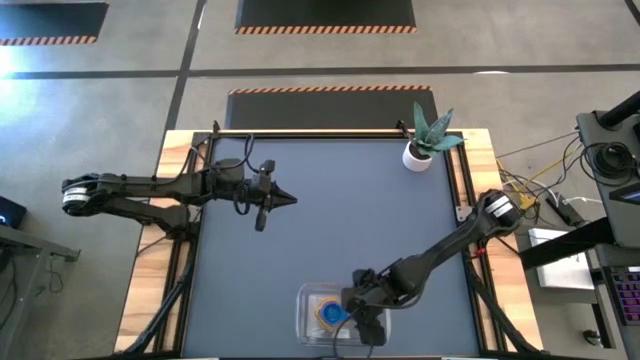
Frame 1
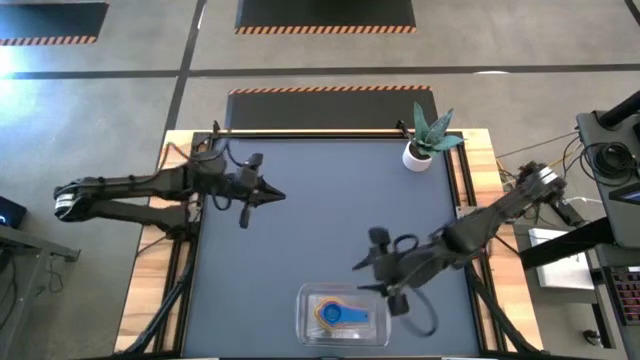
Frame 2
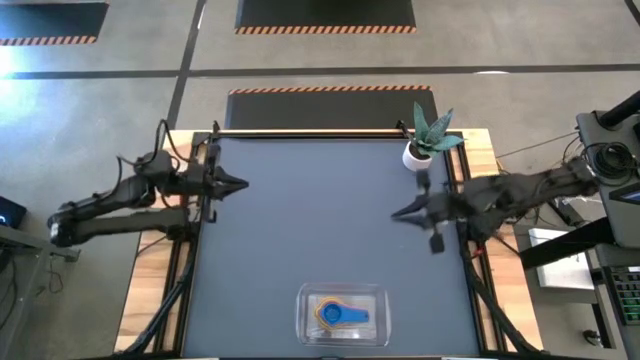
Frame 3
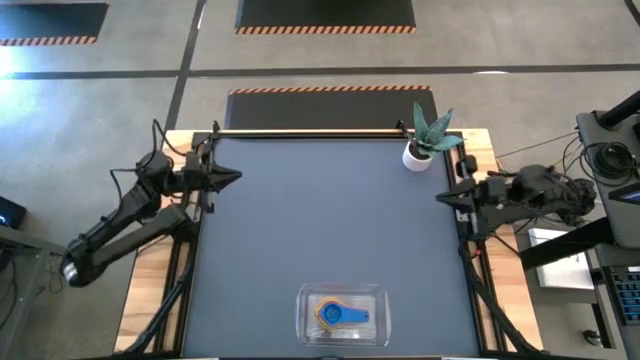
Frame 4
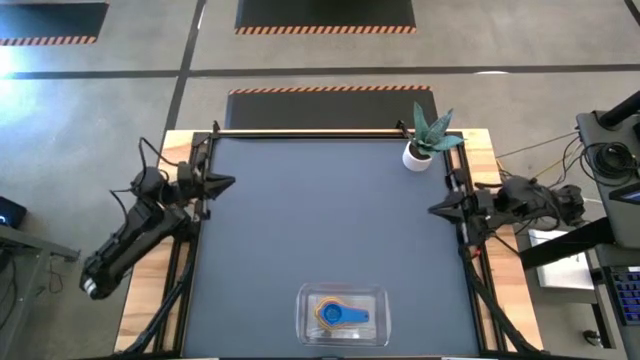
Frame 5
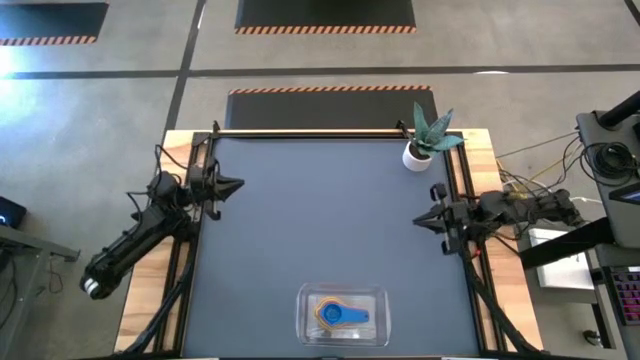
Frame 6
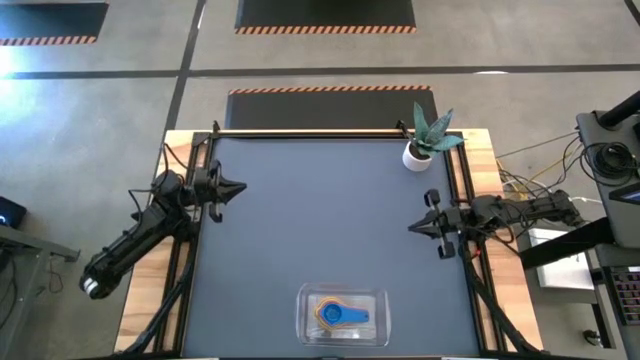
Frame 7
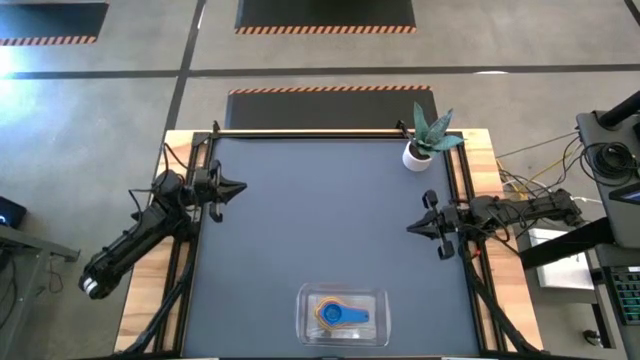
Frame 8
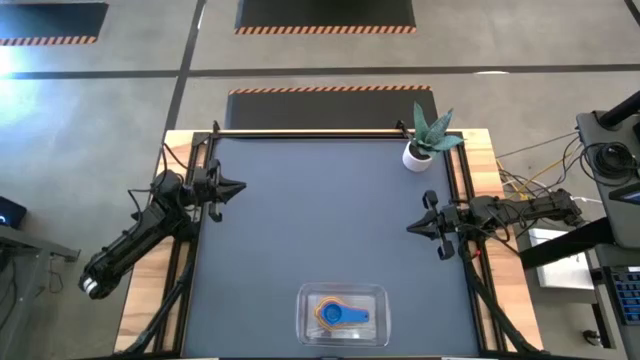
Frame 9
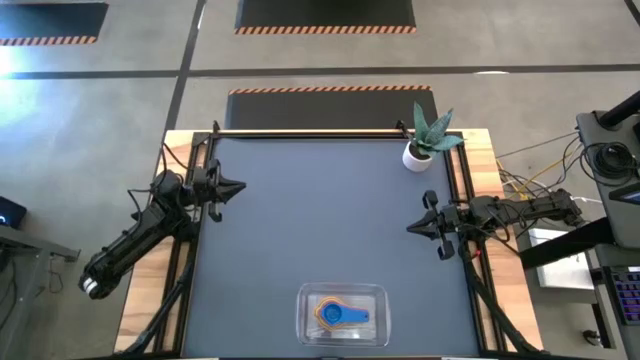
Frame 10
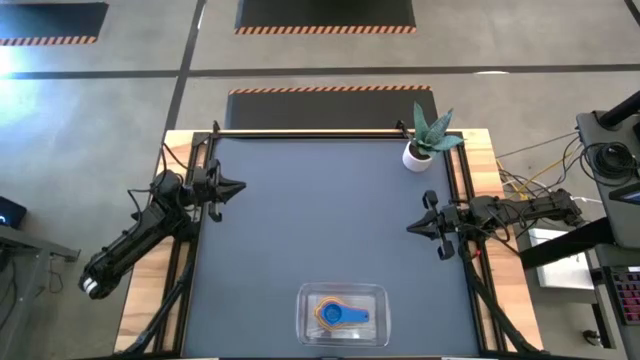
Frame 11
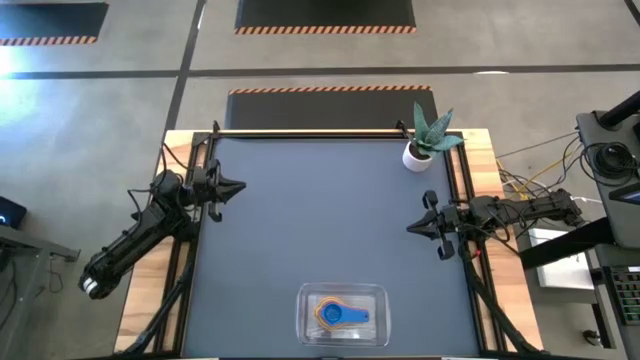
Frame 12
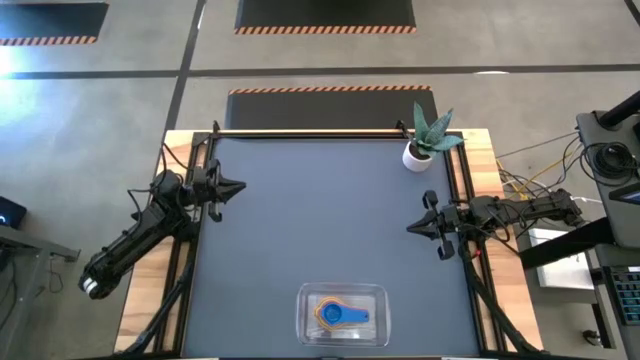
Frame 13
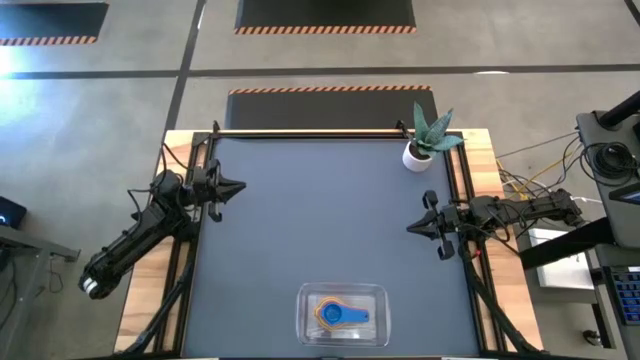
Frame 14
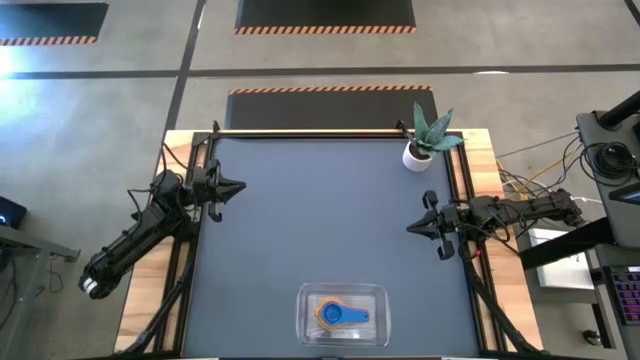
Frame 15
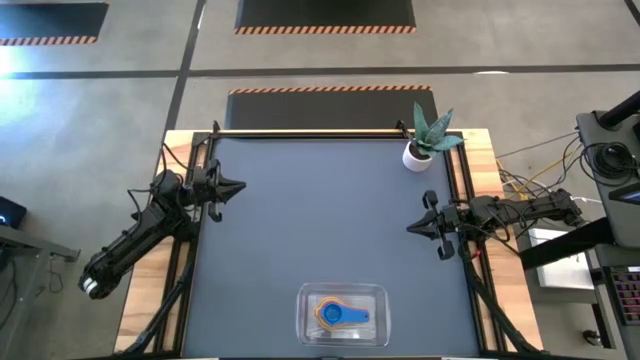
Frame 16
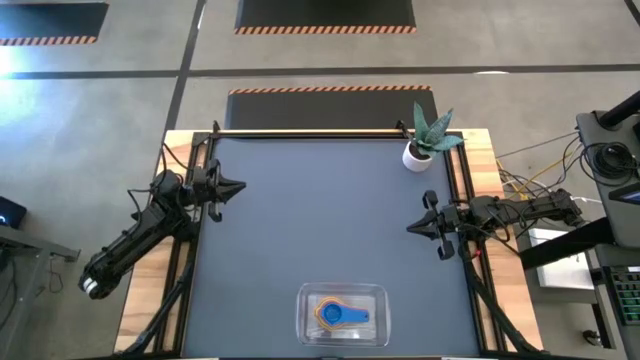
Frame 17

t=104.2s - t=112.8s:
Task: Nest measuring cups in basket
Return to Home Position

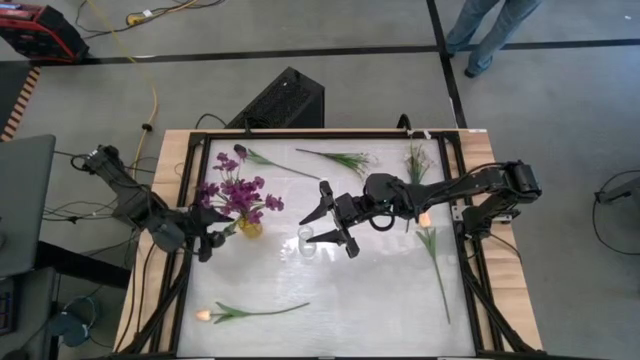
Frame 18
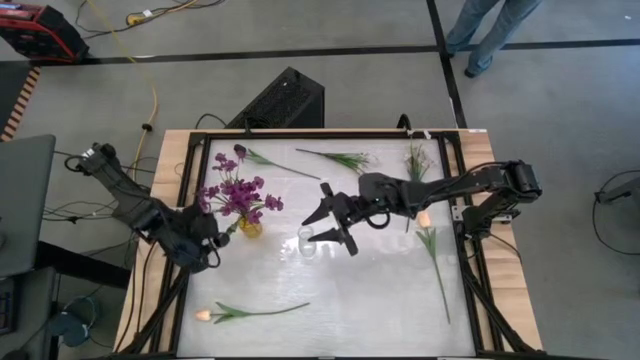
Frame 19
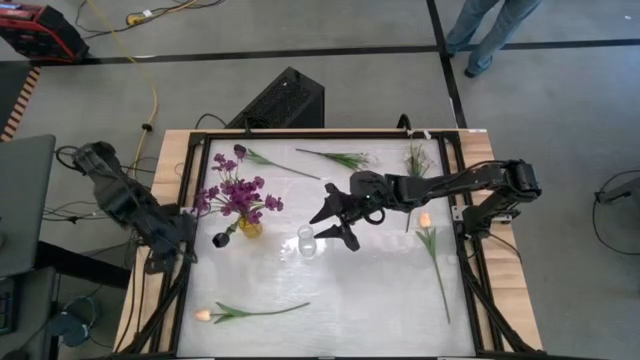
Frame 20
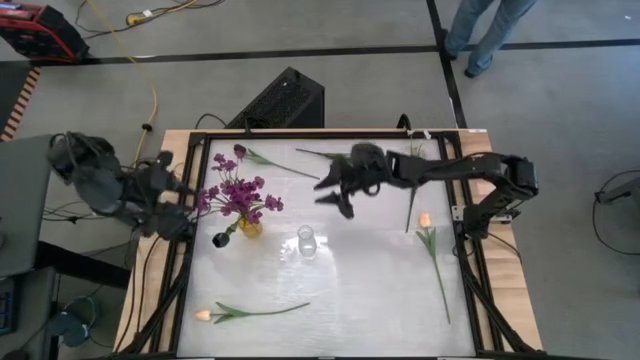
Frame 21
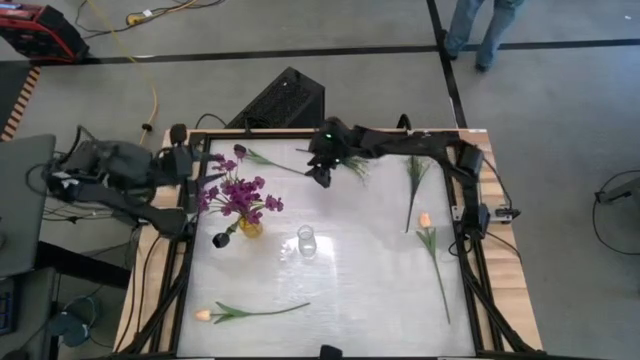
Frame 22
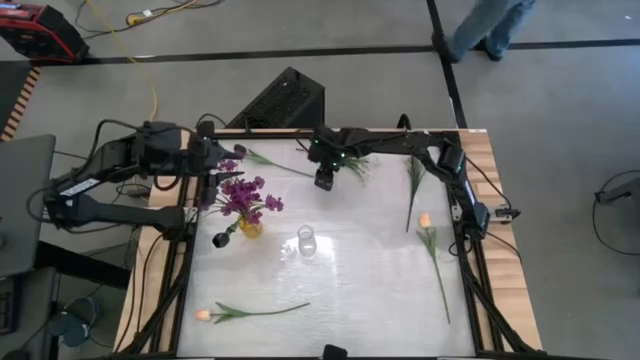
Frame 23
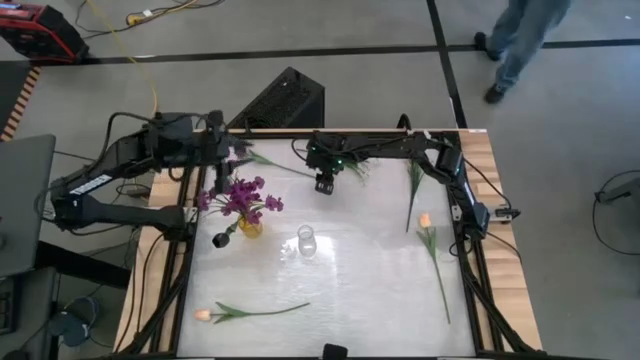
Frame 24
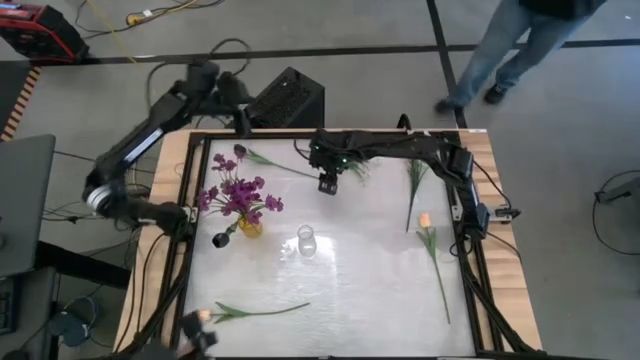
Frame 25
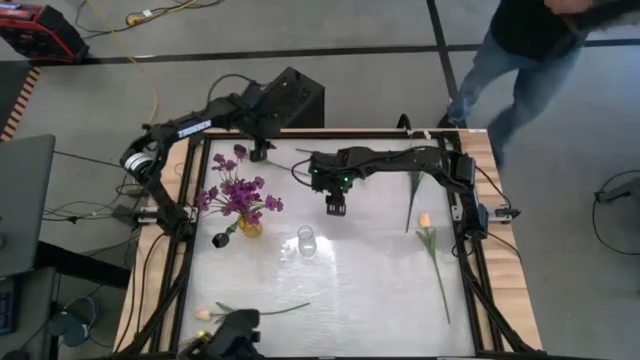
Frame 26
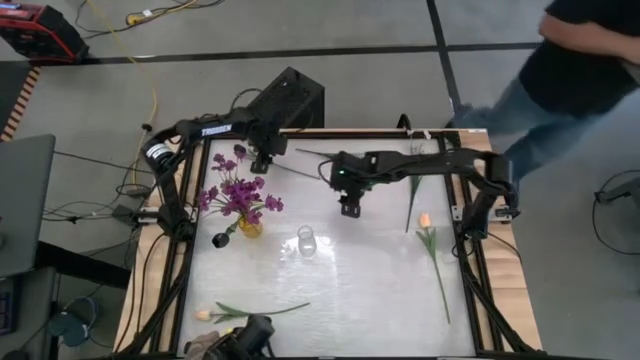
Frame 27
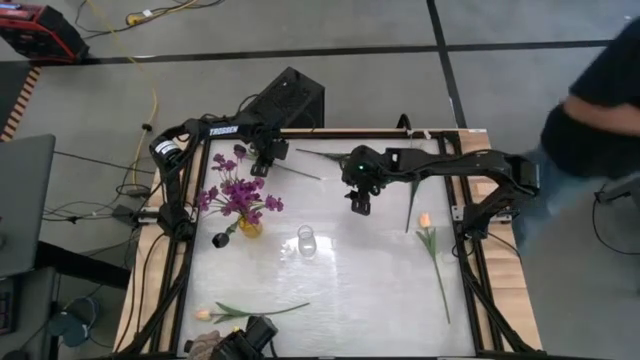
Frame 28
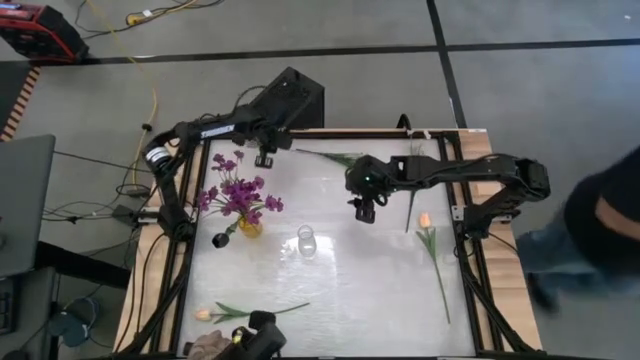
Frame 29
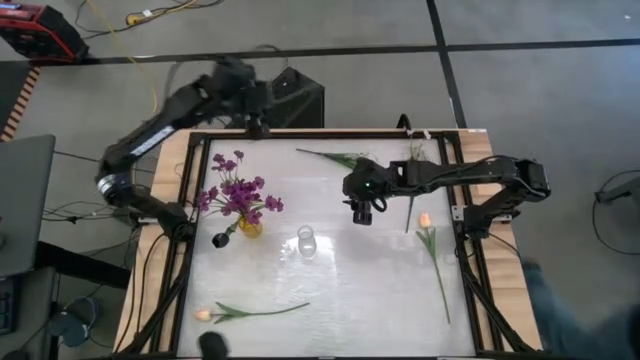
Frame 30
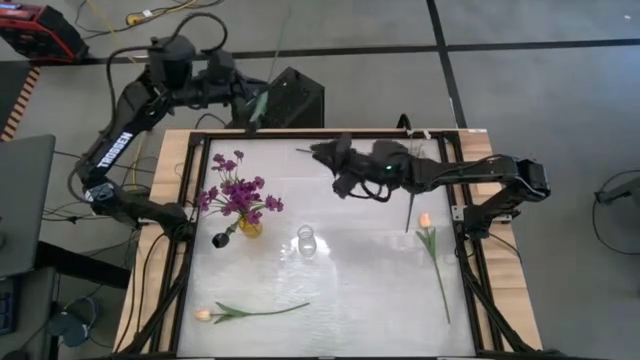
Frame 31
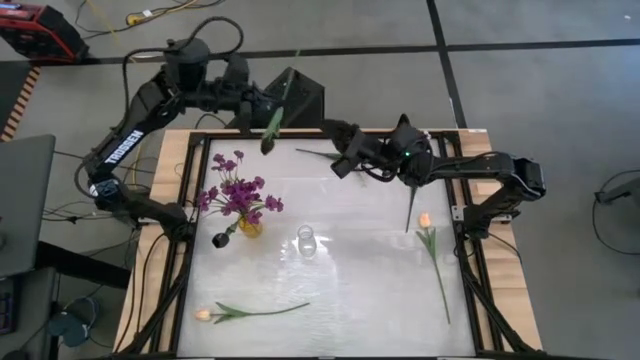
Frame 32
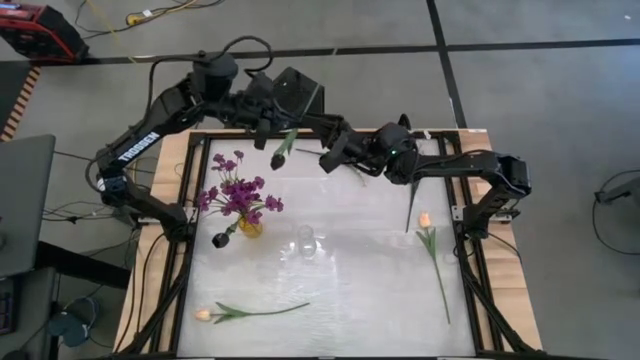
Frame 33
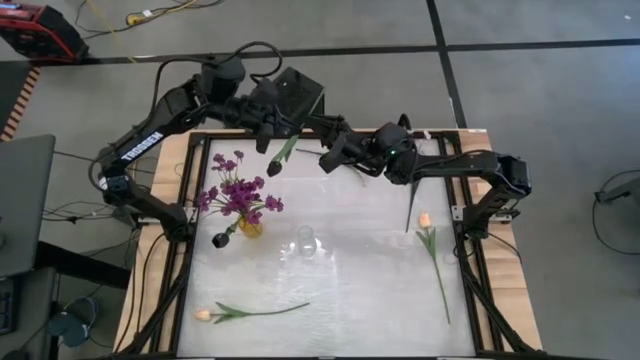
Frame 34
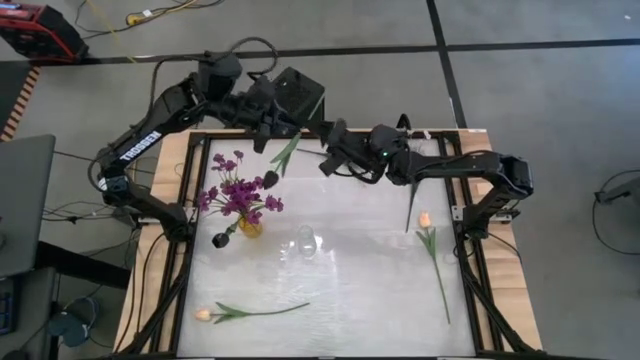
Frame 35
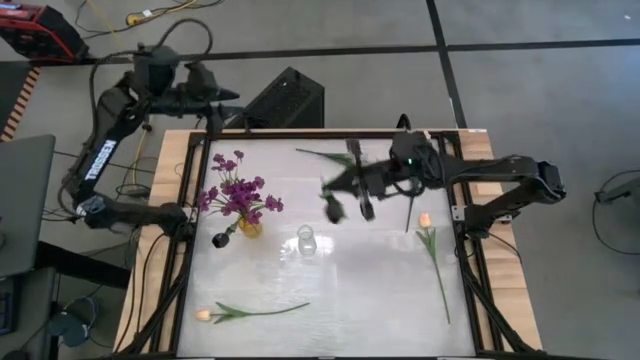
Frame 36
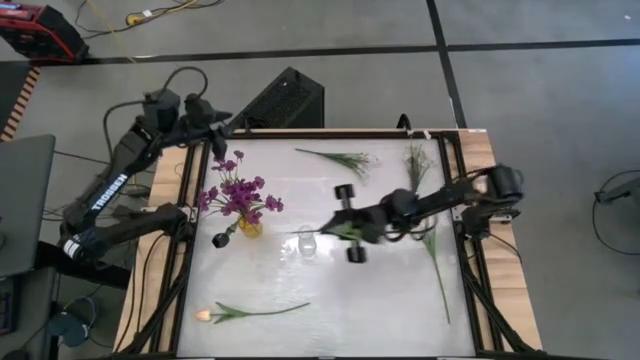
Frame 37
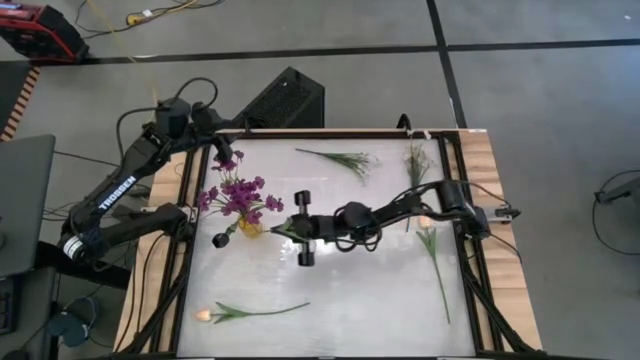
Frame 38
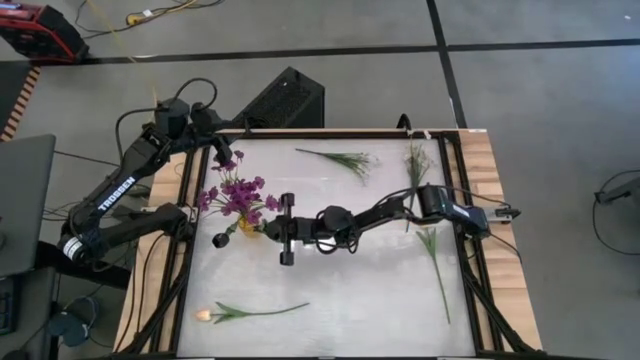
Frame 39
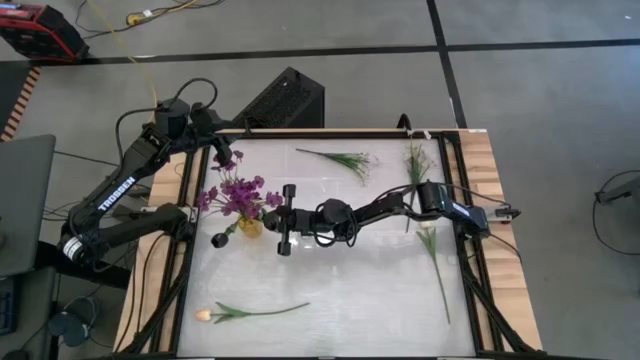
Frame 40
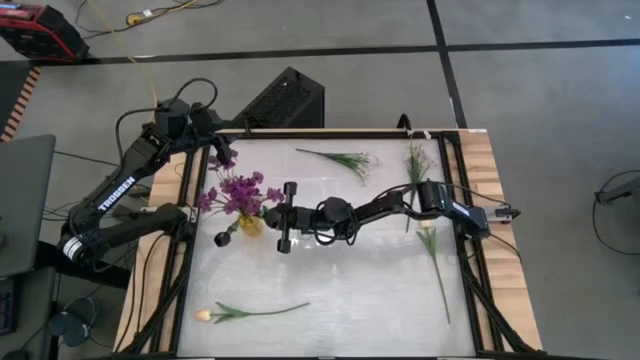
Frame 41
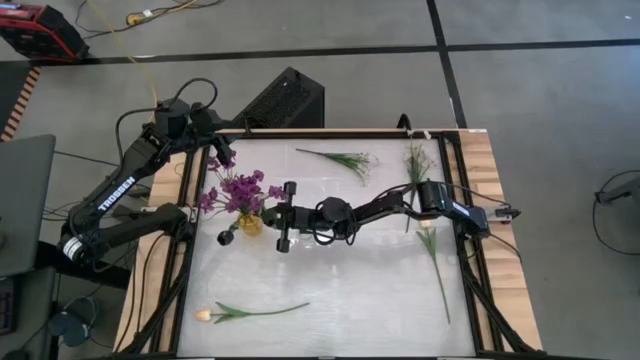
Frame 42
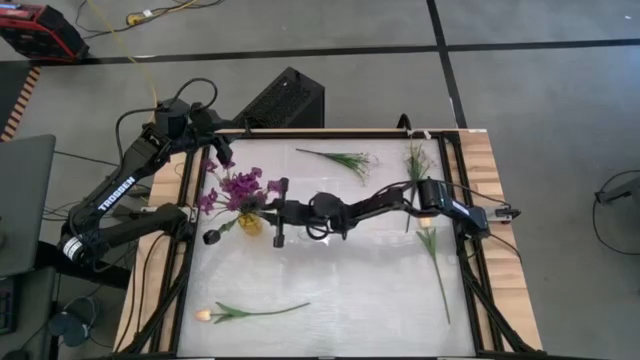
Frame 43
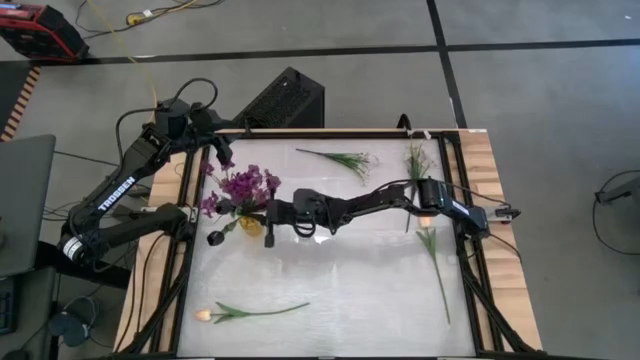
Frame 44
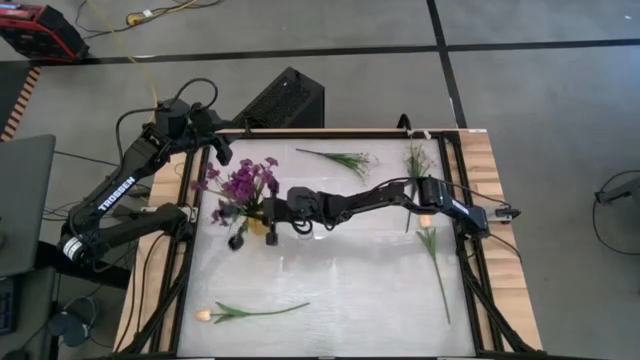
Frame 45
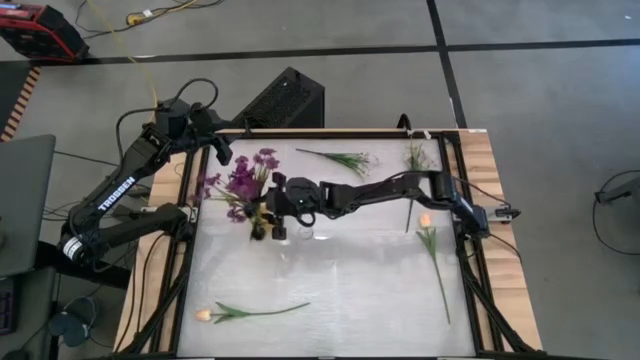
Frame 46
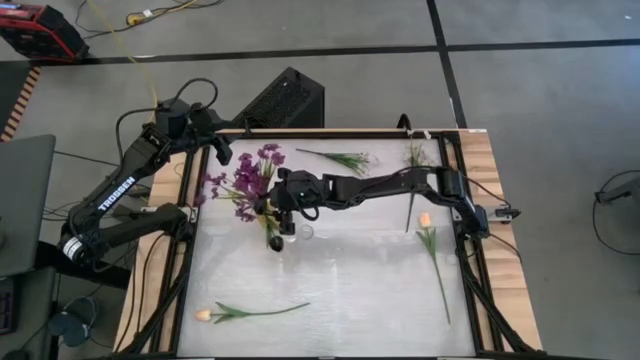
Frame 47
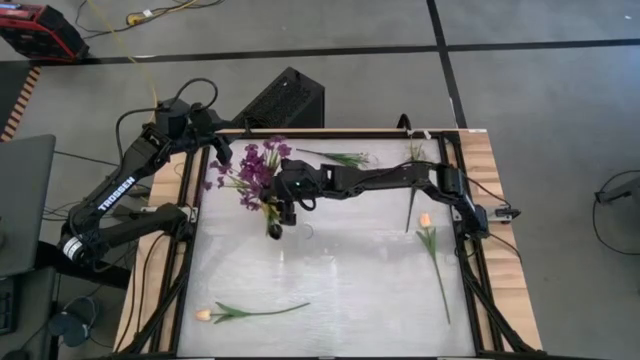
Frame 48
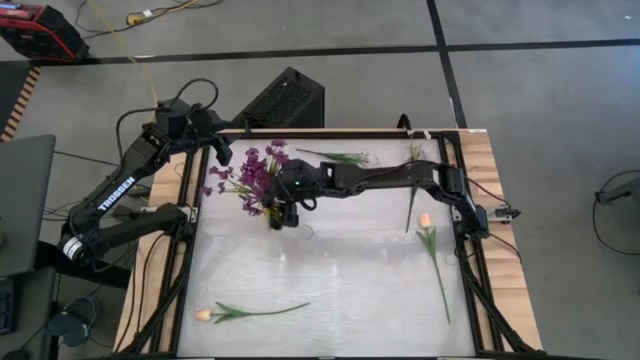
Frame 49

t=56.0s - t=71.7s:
Task: Sort flowers into vase by color
Put the black tulip into the yellow vase
